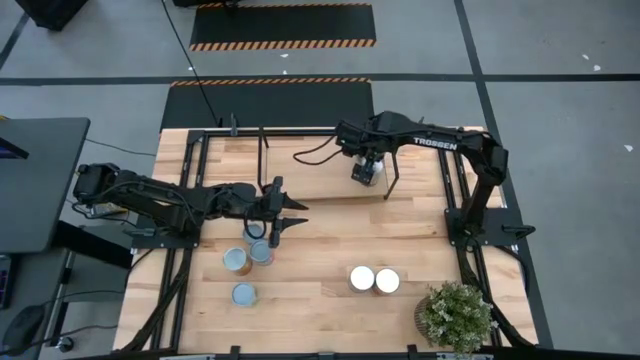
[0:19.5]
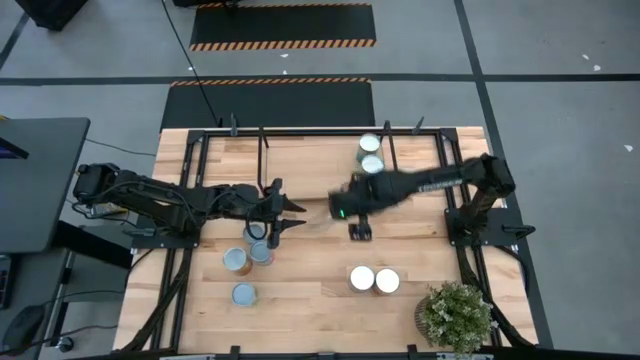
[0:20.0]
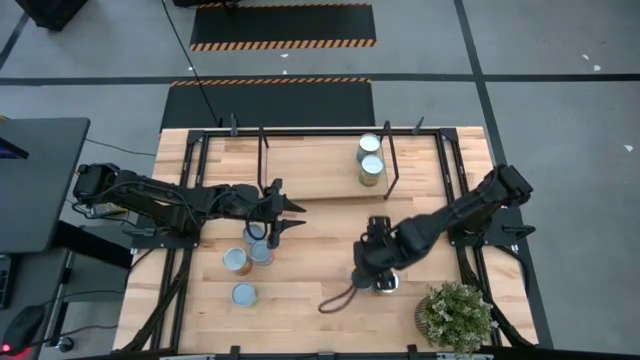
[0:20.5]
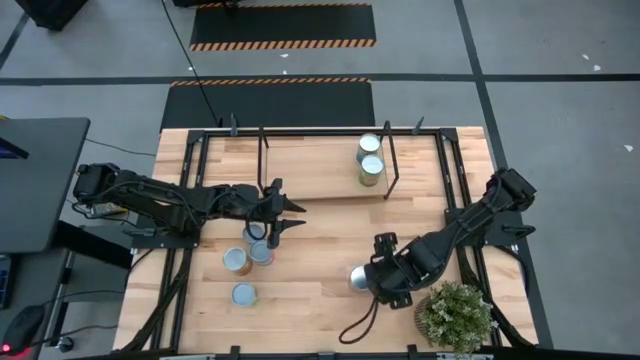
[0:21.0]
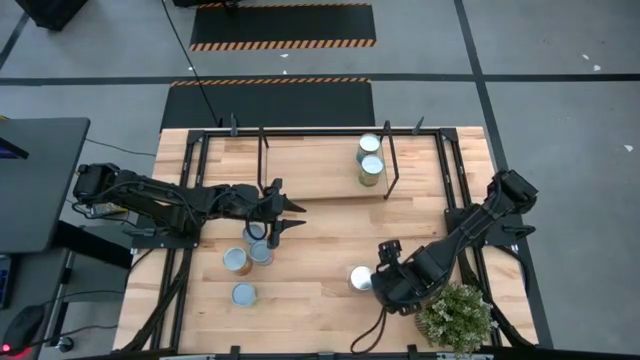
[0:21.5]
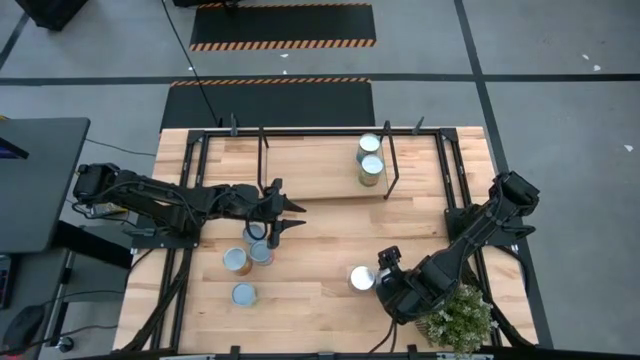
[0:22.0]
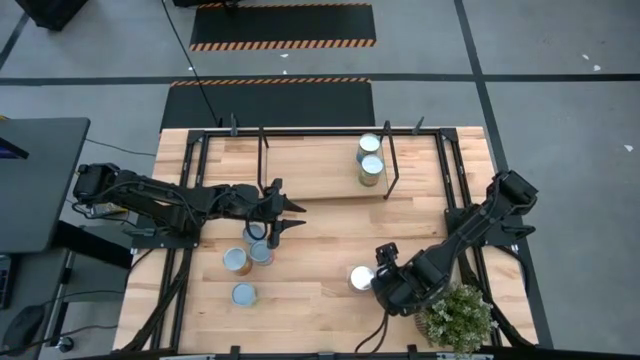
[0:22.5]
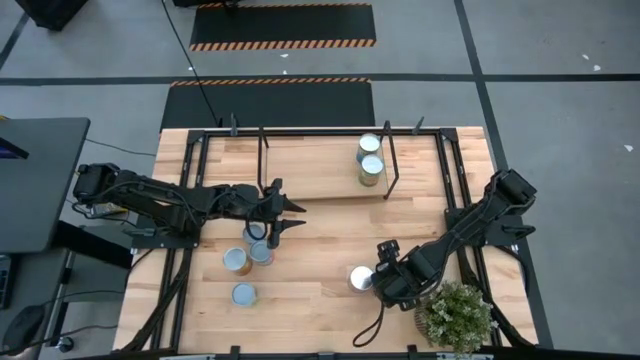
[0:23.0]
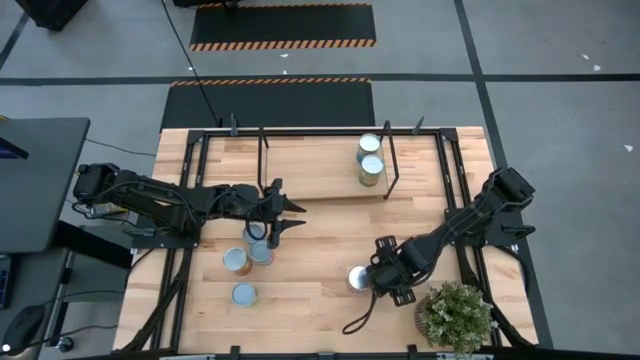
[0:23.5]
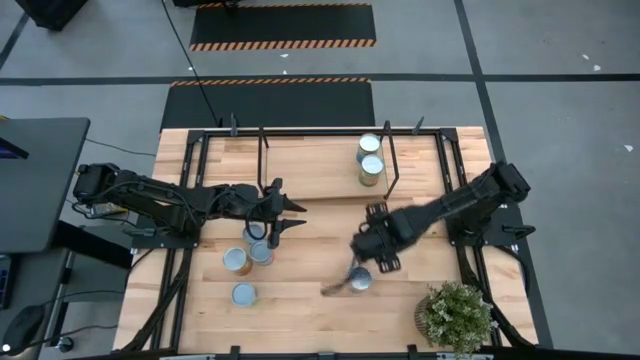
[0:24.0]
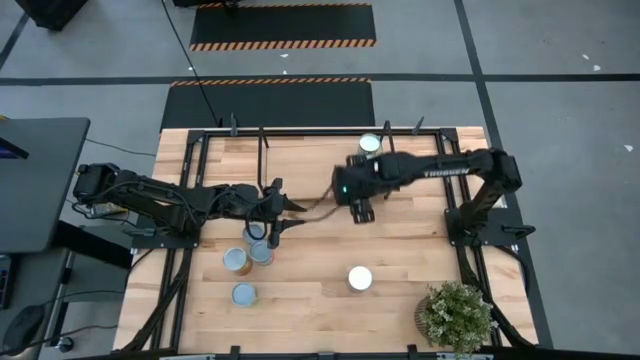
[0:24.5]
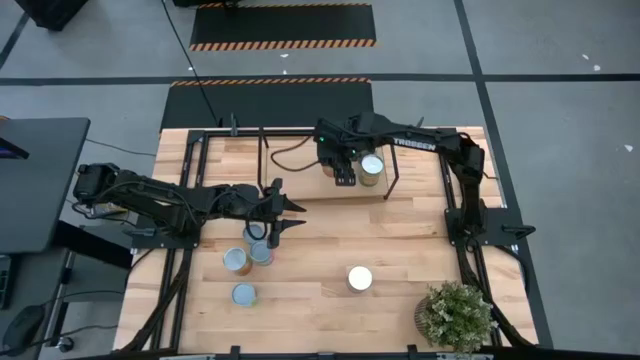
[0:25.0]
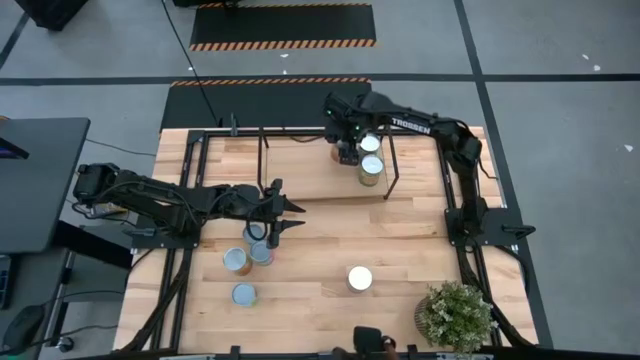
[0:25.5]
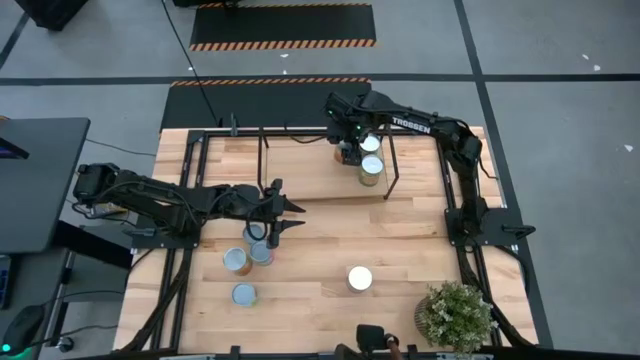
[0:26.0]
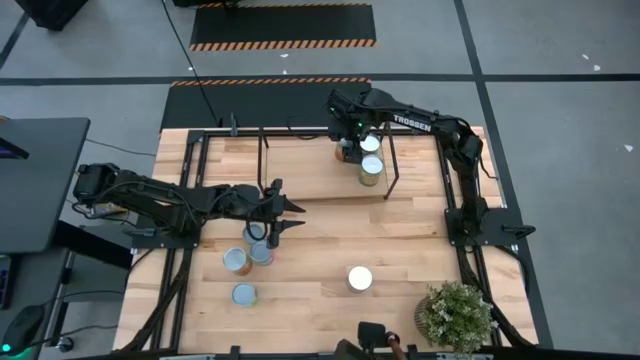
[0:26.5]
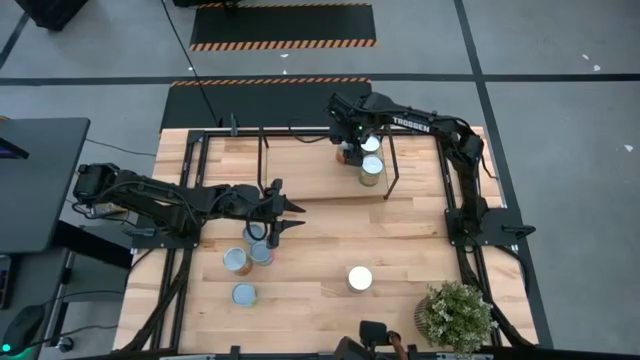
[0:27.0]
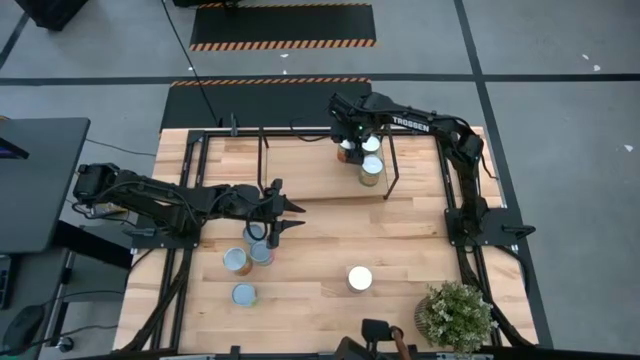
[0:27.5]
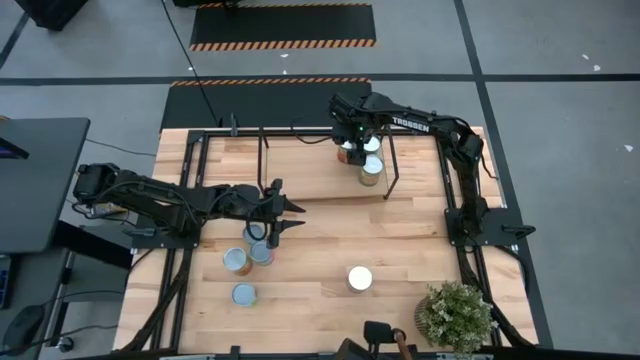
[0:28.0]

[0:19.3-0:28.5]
Task: Pick and place cans onto a shelf
Put the canned pineapples on the shelf

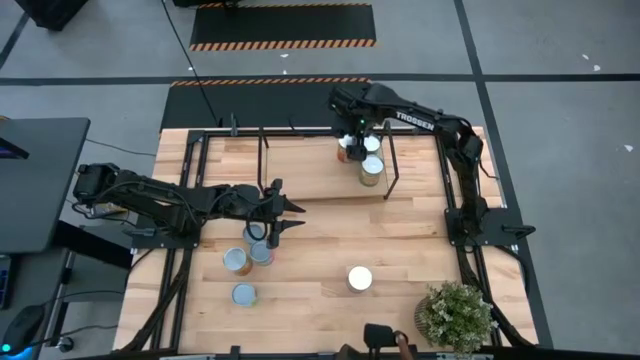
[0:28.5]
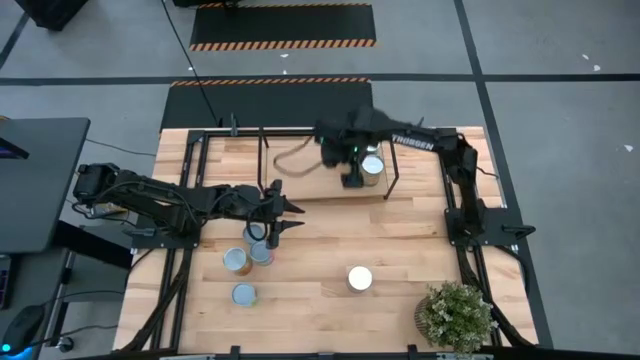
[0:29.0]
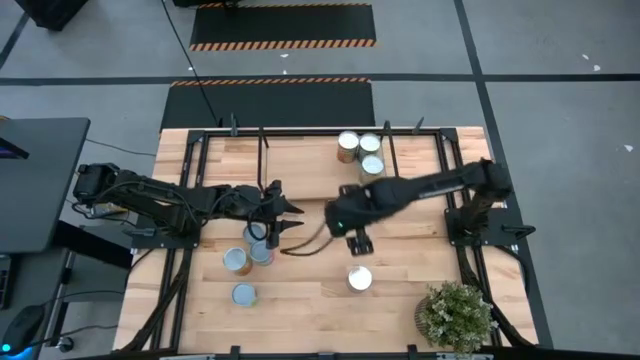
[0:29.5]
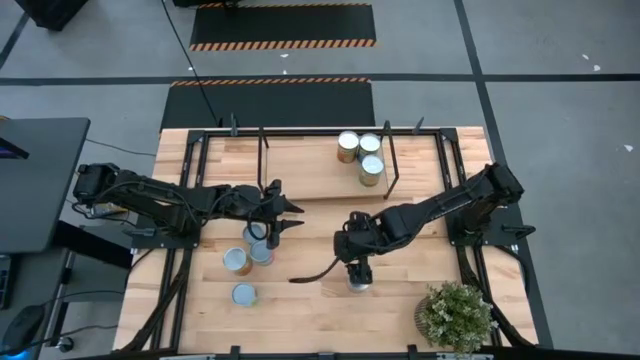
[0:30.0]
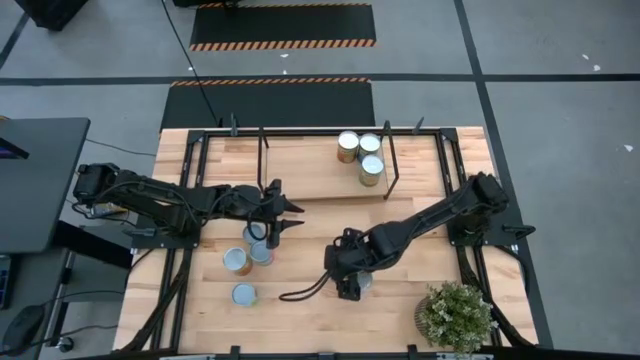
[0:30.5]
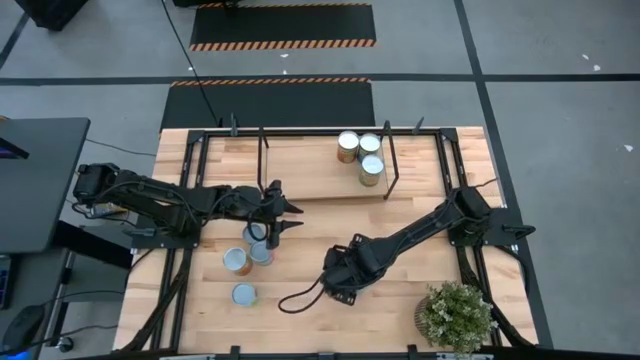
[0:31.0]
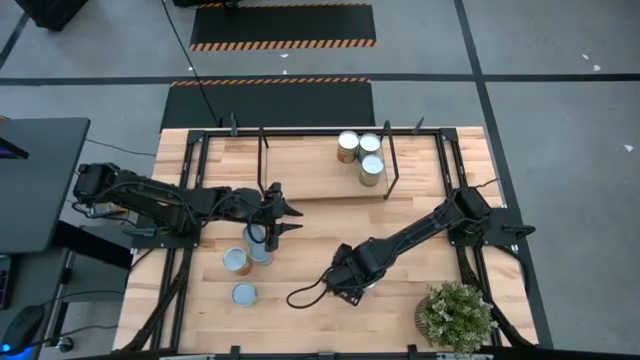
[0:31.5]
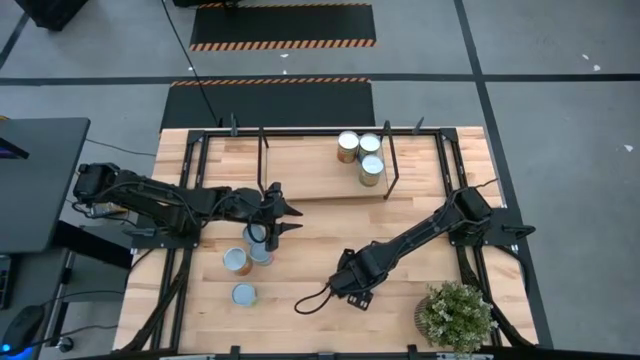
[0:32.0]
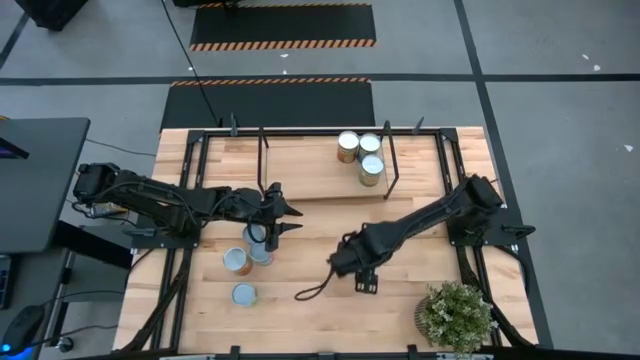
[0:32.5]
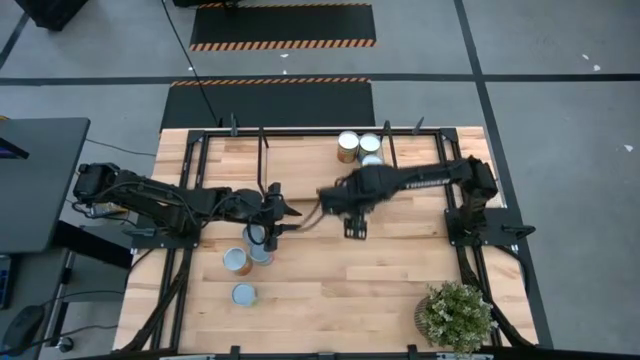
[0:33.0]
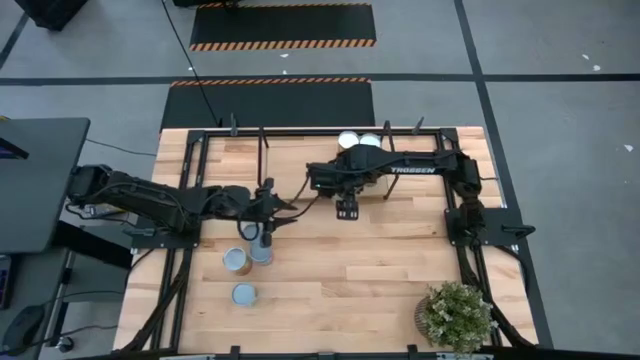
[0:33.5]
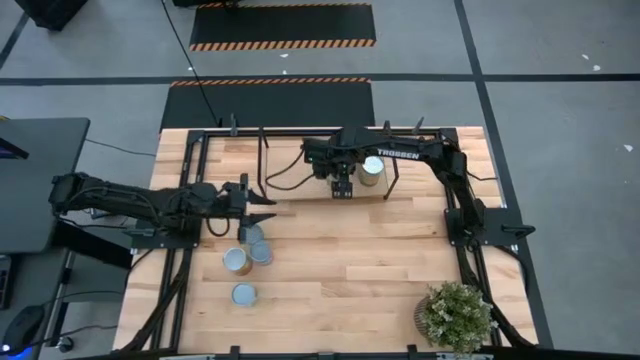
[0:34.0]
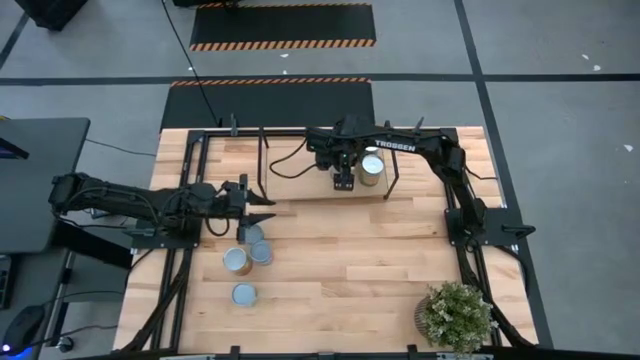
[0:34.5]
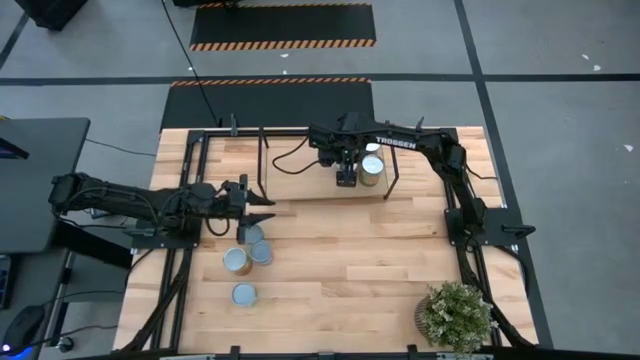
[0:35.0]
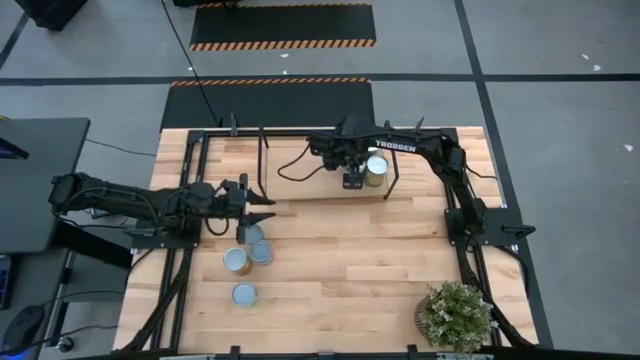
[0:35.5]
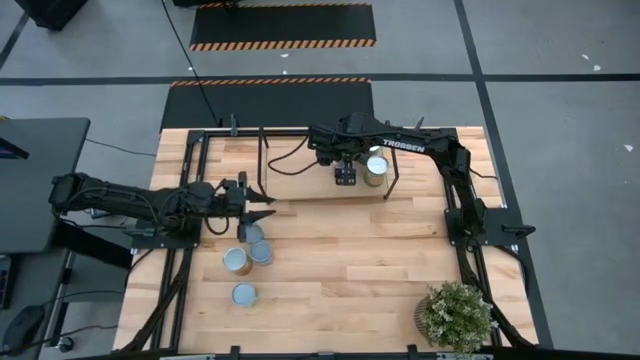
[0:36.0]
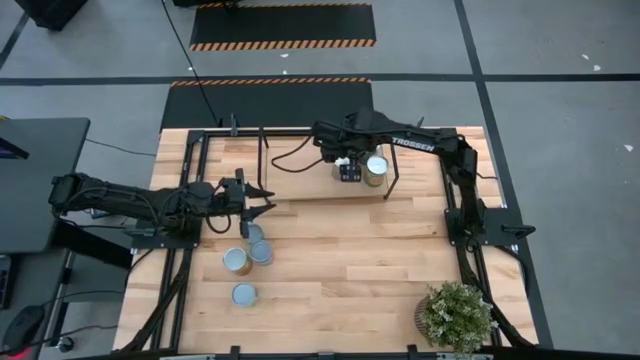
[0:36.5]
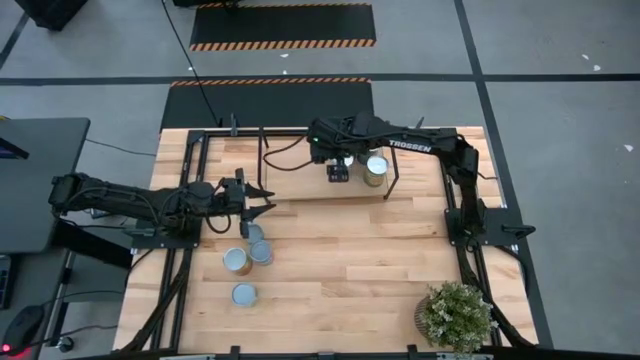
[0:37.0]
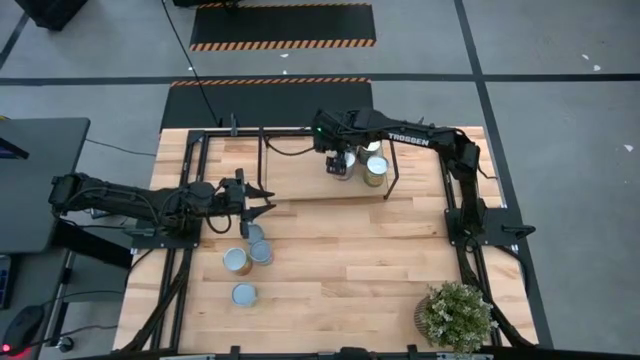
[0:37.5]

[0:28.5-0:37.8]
Put the canned peaches on the shelf

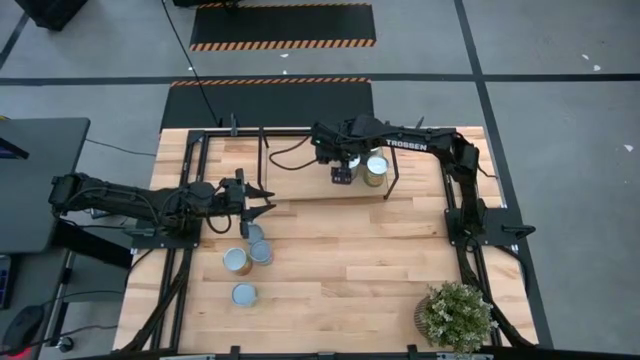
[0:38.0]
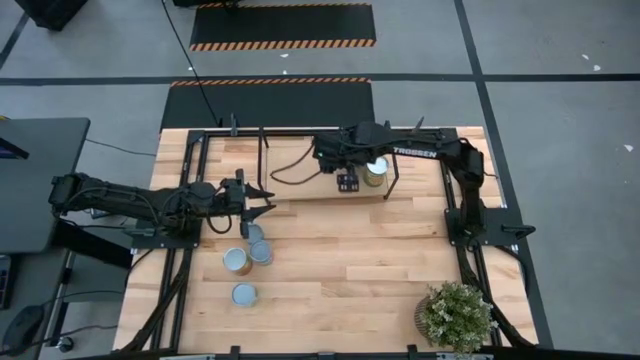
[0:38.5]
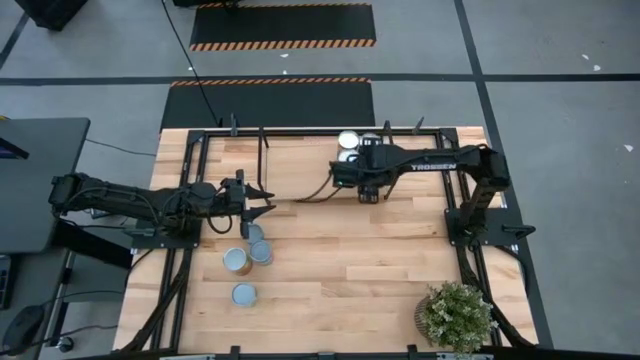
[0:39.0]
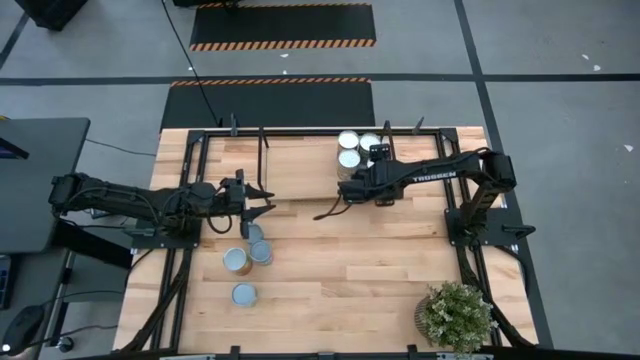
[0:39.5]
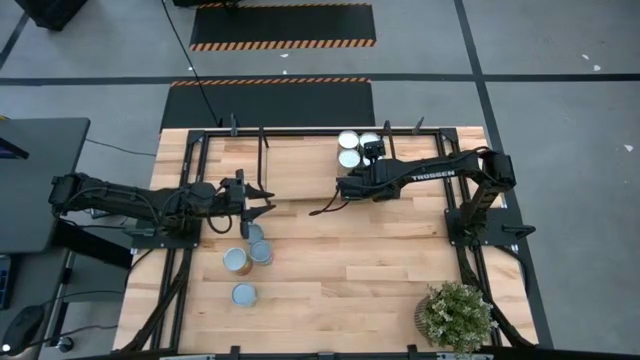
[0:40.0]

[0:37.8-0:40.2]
Adjust canned oranges

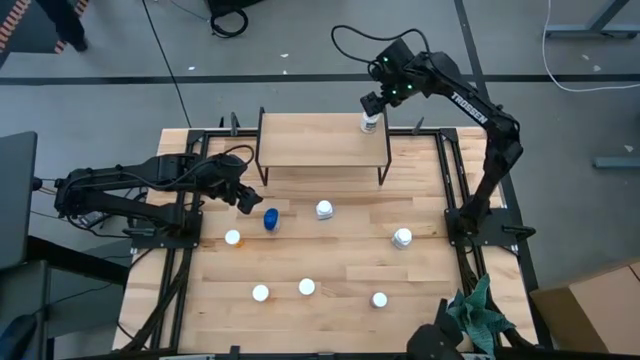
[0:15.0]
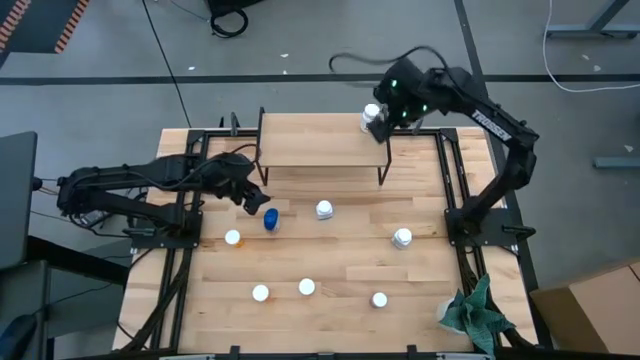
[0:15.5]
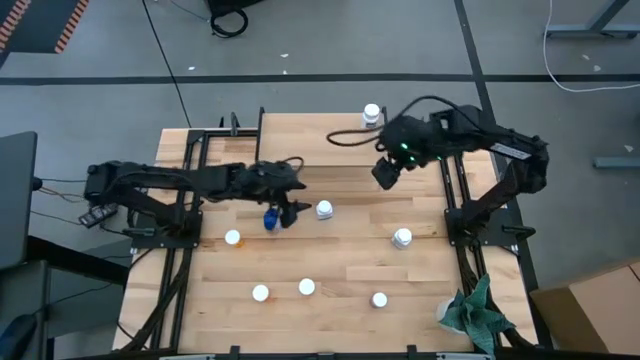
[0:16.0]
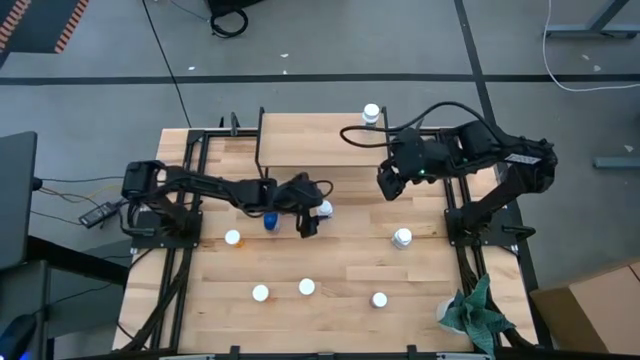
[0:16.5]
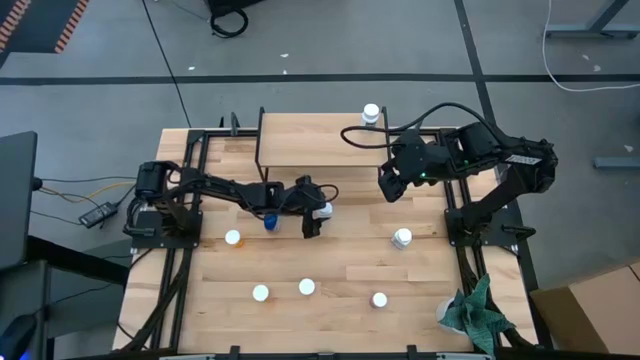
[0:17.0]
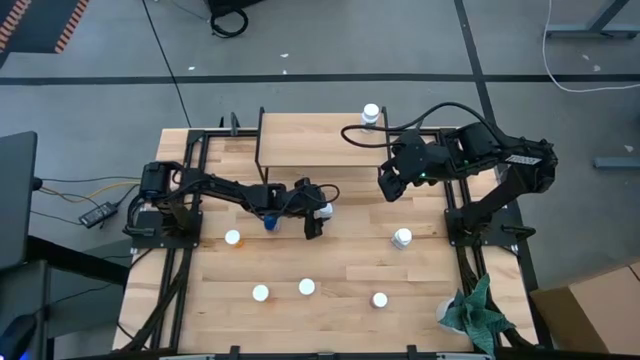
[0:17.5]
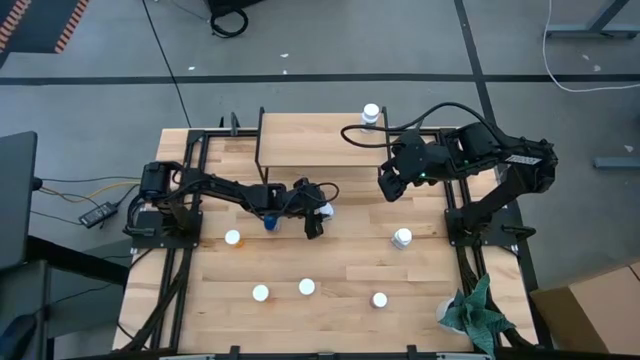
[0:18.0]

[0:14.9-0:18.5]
Task: Pick and place medicine bottles onto shelf by color
Put the left white blue medicine bottle on the shelf
